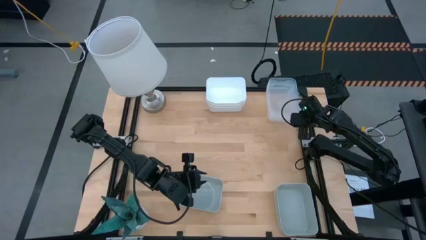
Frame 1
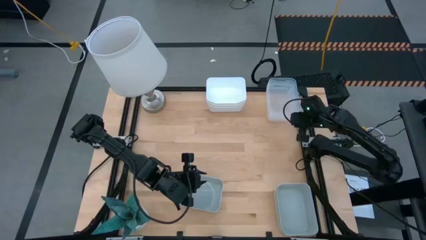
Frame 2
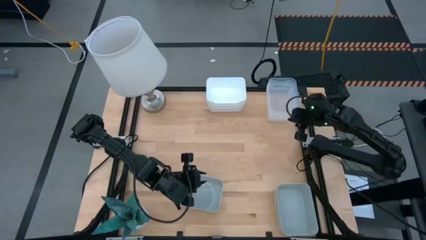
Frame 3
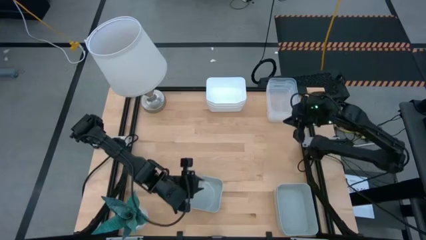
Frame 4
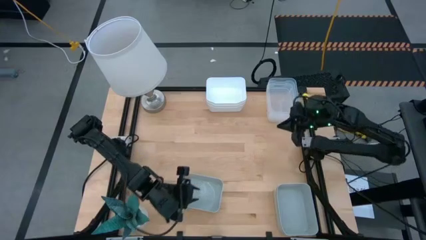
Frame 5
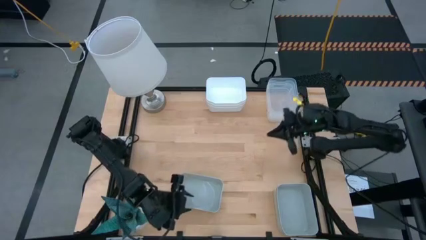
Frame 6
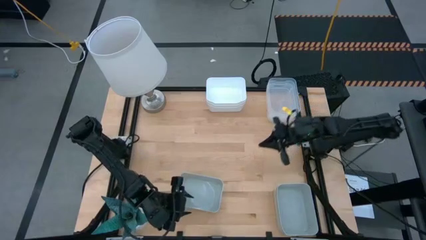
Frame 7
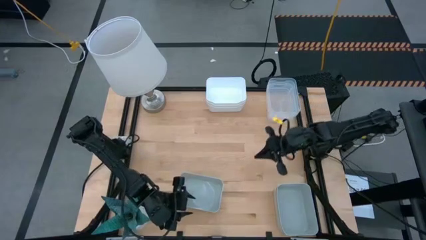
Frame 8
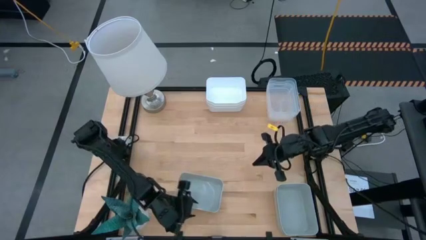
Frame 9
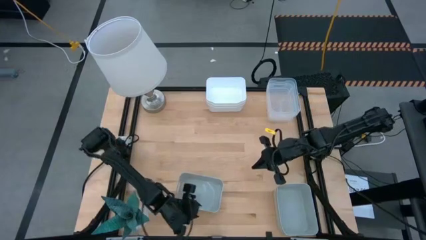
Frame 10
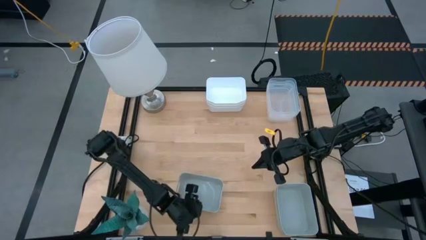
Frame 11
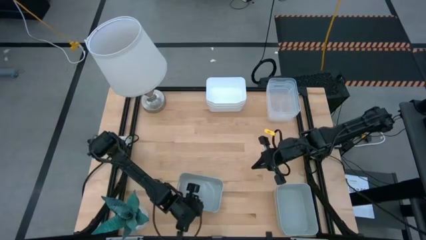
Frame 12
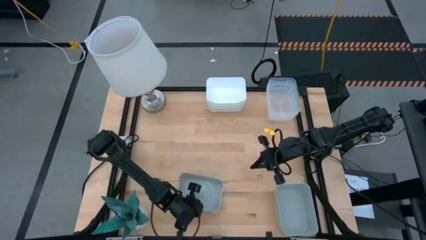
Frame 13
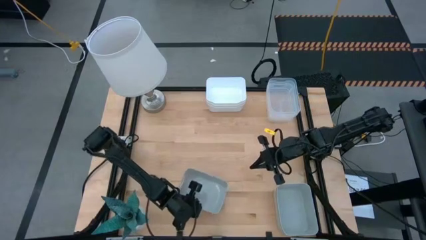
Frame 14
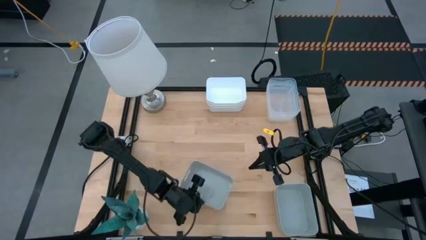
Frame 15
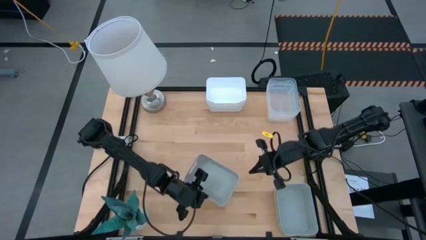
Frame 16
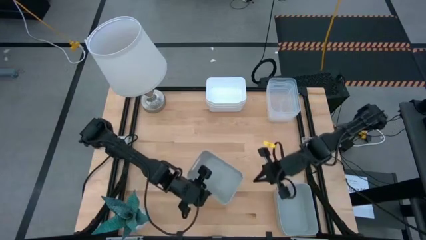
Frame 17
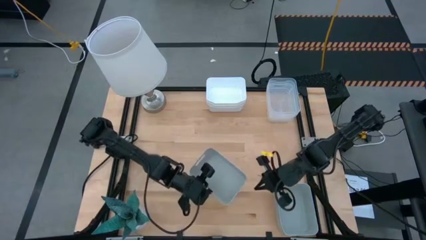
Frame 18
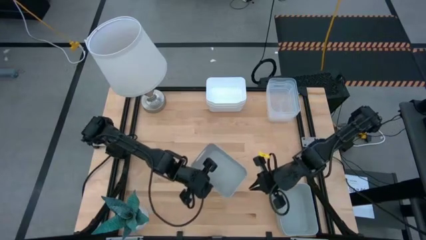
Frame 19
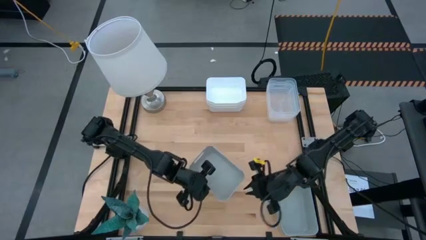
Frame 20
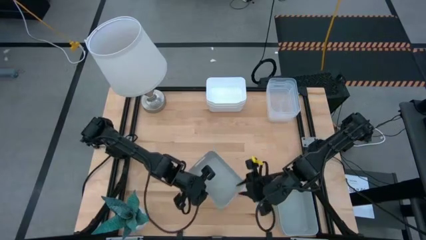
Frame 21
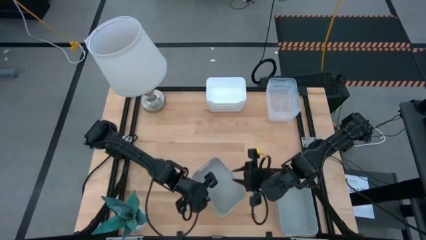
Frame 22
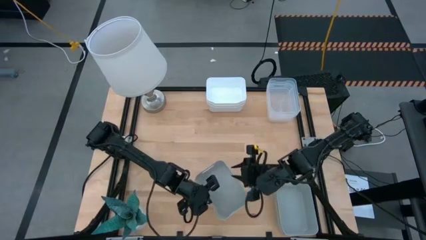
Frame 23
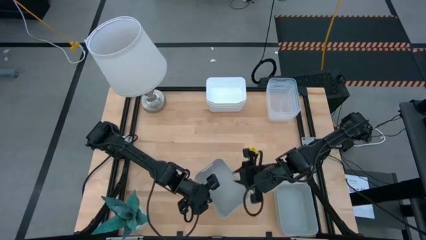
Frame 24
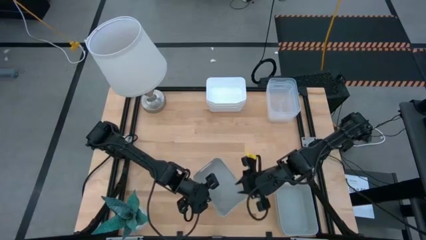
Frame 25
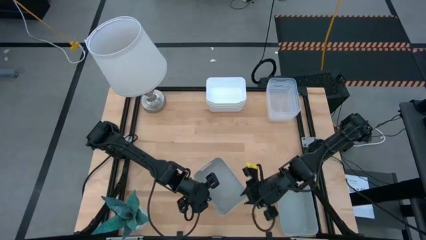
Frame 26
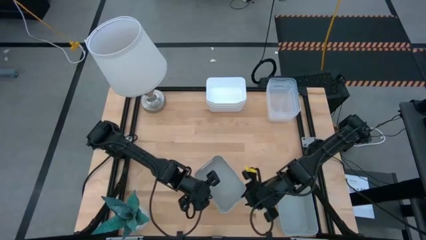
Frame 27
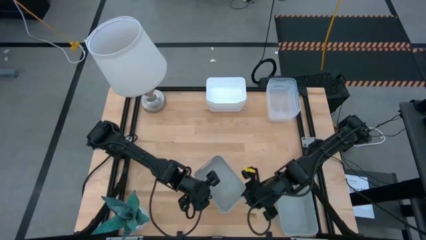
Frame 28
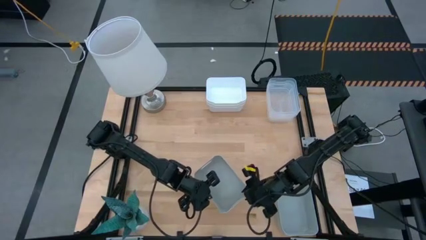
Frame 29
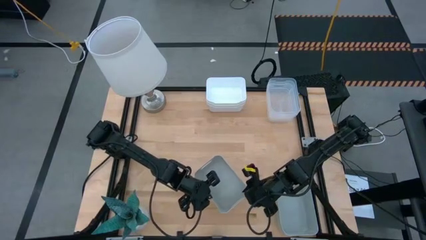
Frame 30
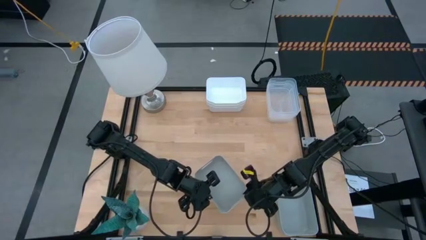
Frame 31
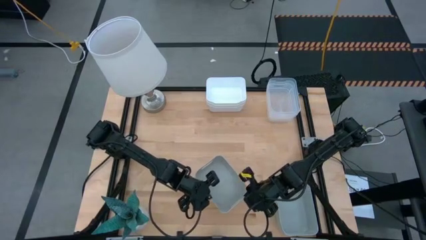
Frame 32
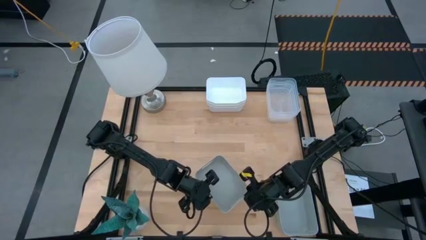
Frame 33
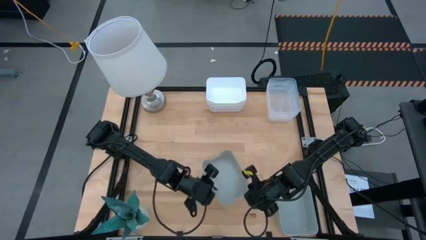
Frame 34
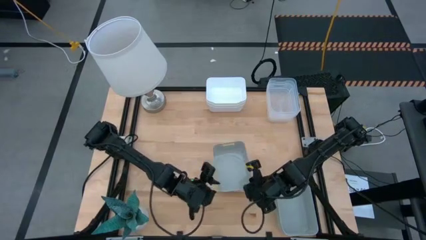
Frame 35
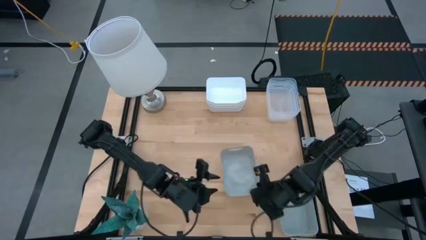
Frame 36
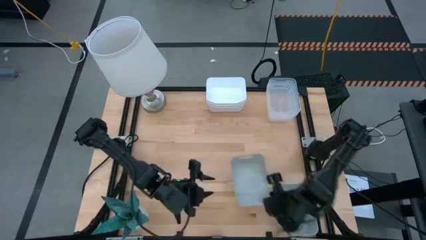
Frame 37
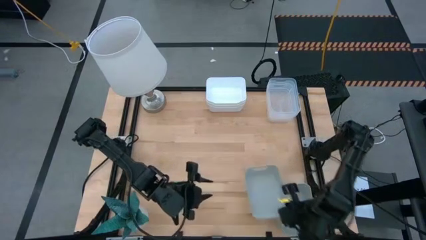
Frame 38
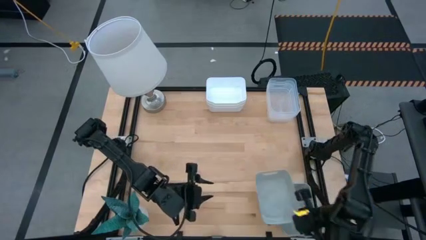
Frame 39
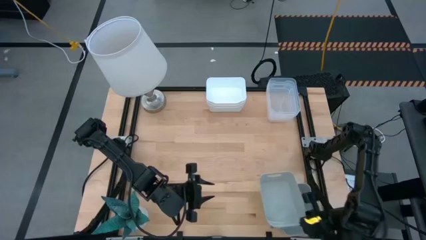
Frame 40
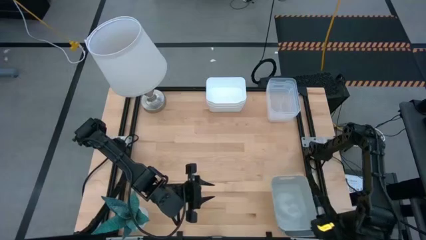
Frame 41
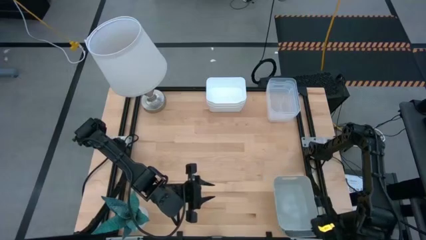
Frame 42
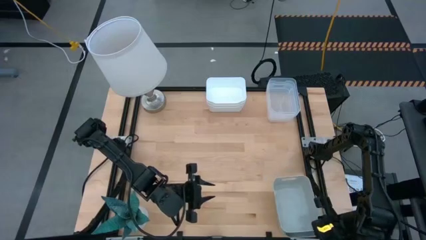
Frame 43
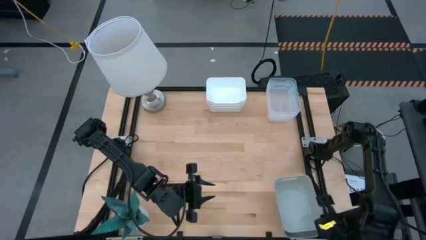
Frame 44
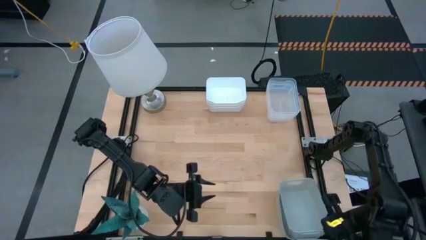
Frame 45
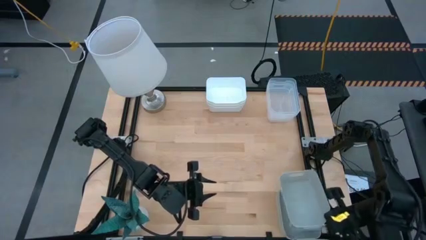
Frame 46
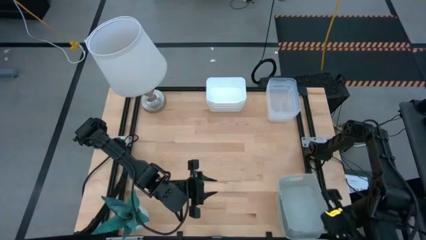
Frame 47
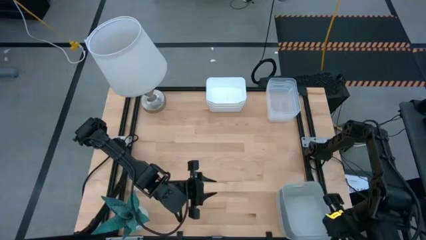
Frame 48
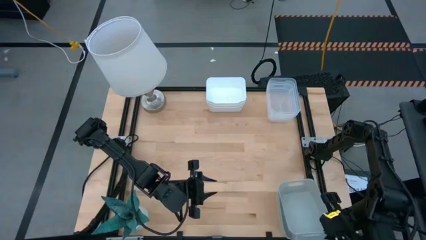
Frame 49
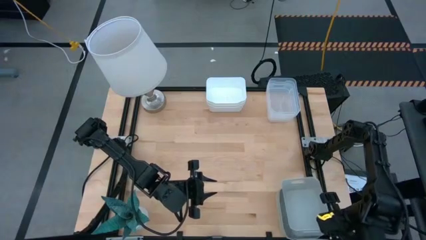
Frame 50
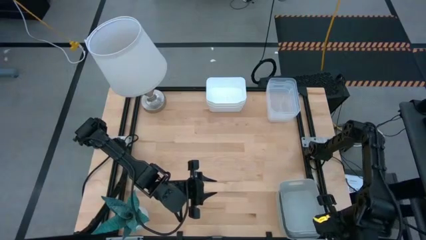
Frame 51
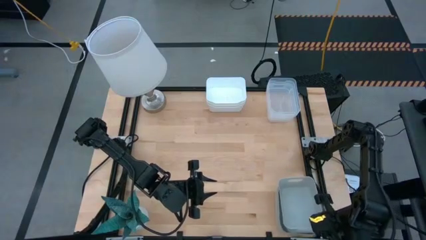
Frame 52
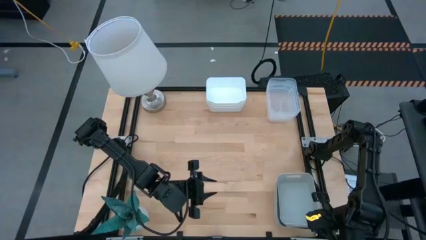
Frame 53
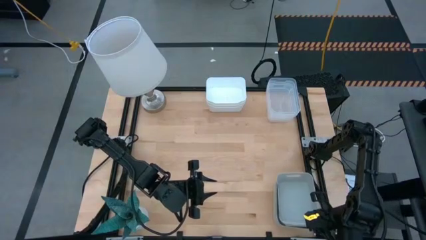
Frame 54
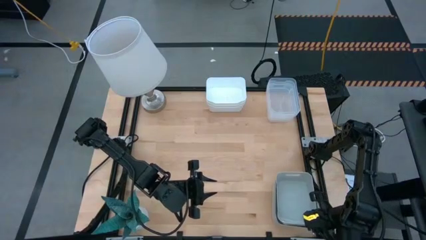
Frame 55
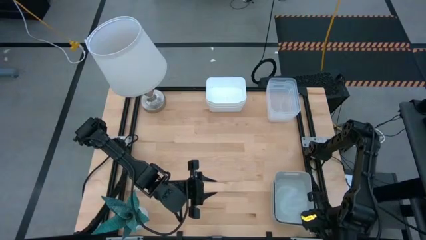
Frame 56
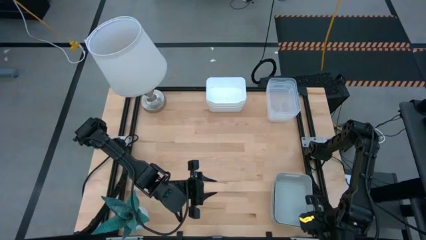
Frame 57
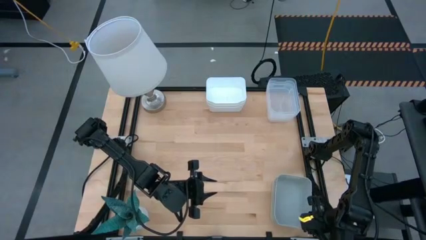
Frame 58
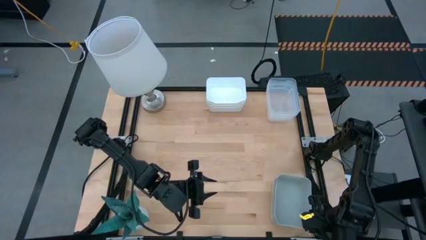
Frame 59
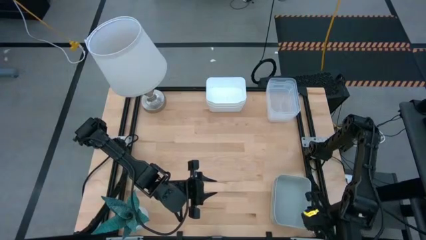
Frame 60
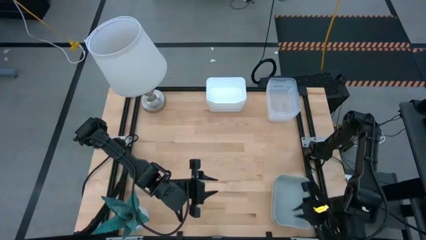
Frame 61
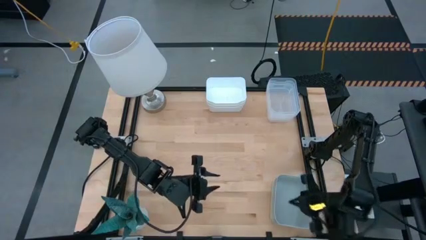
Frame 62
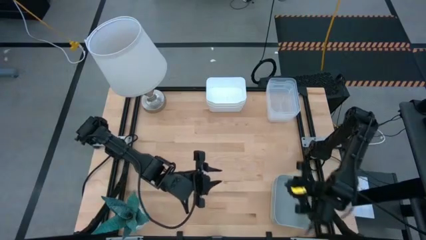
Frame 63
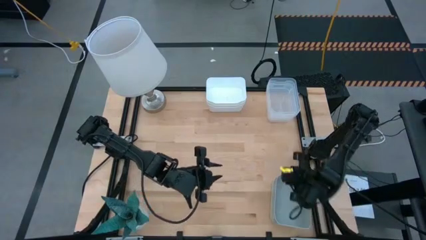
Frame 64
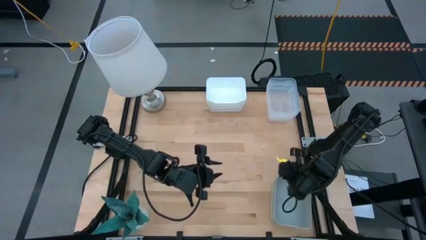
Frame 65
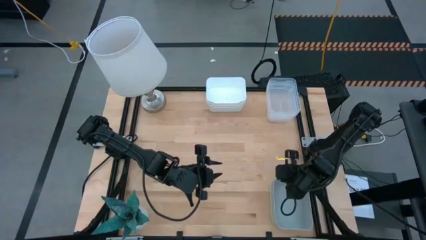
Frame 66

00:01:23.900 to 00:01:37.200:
Stack the left gray bin on the gray bins
